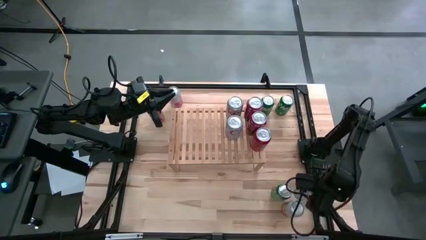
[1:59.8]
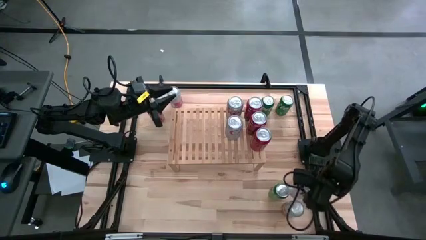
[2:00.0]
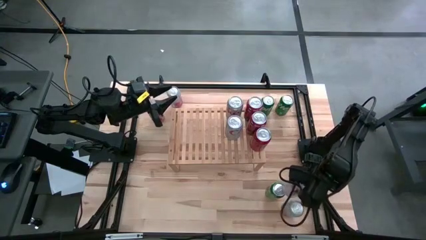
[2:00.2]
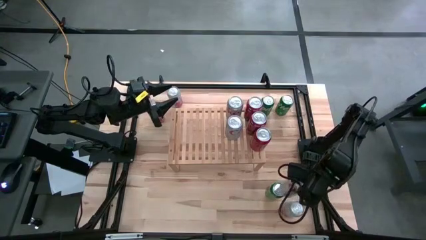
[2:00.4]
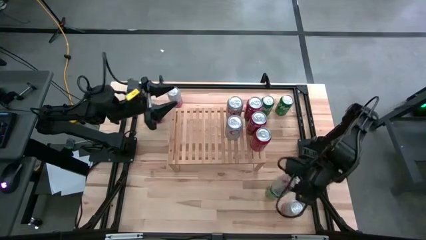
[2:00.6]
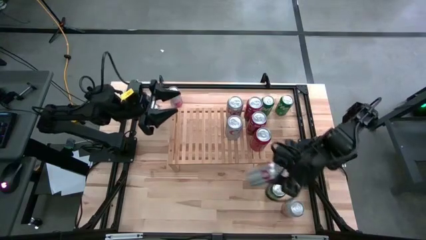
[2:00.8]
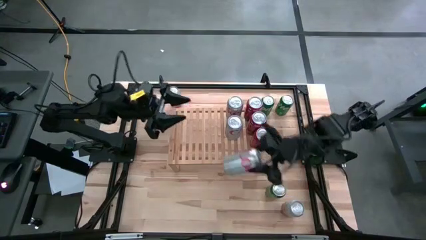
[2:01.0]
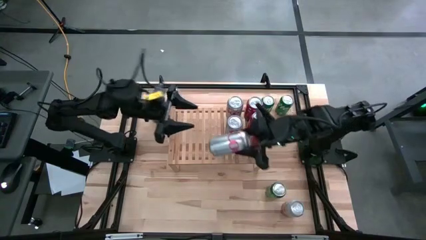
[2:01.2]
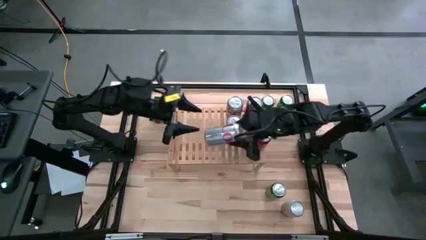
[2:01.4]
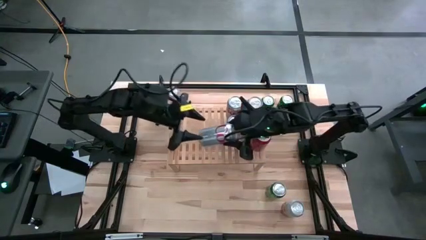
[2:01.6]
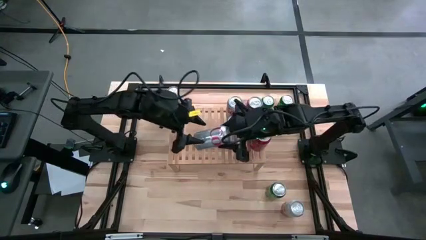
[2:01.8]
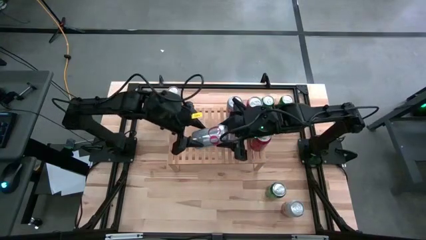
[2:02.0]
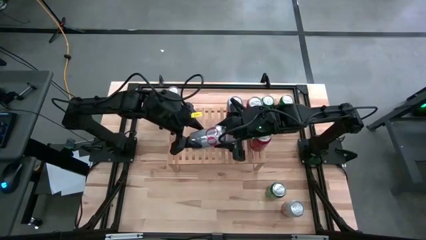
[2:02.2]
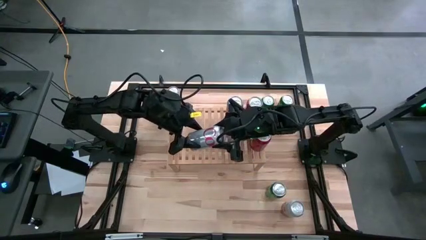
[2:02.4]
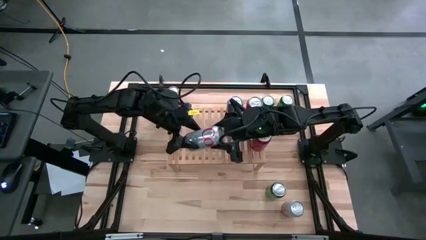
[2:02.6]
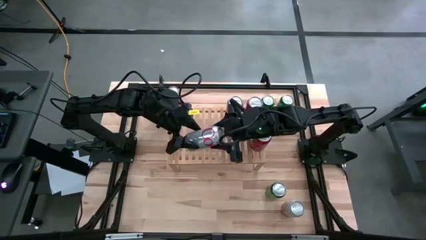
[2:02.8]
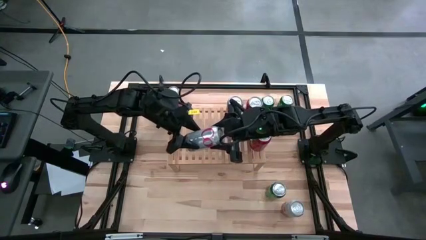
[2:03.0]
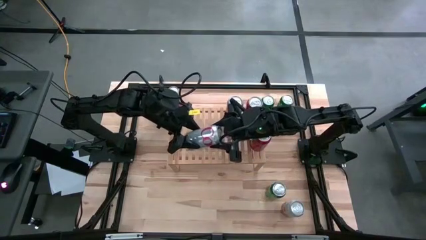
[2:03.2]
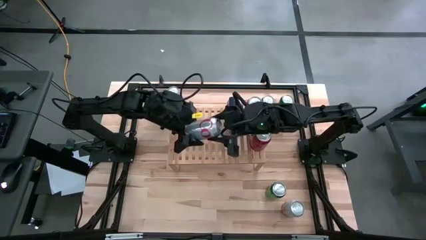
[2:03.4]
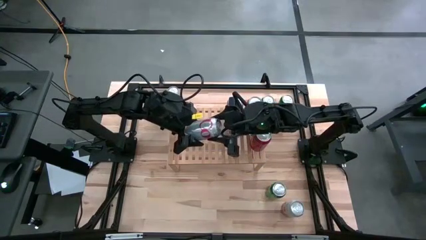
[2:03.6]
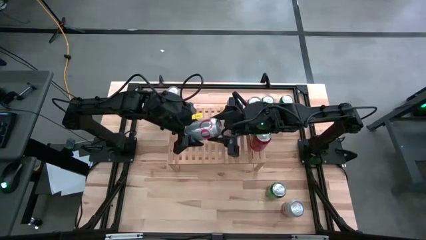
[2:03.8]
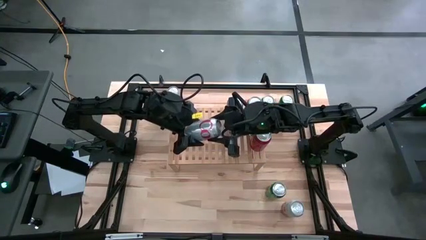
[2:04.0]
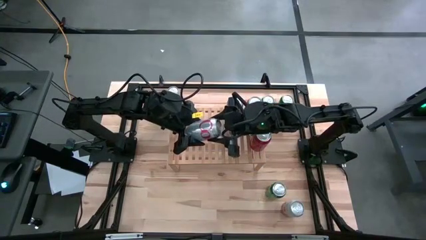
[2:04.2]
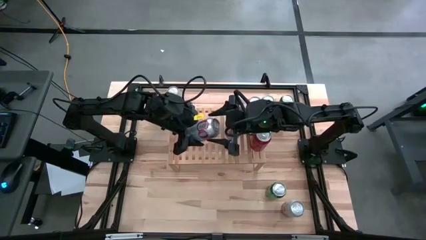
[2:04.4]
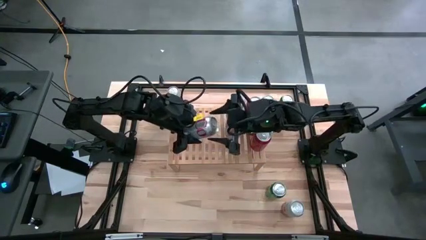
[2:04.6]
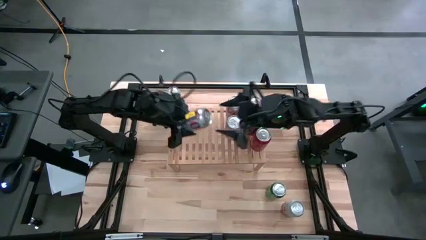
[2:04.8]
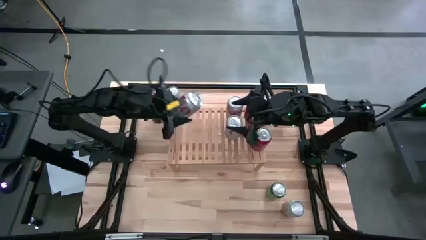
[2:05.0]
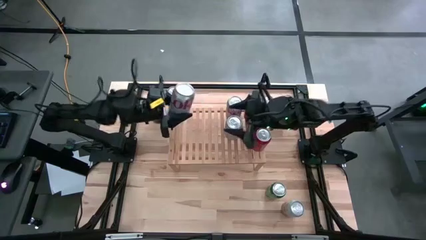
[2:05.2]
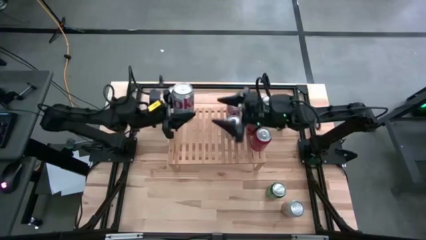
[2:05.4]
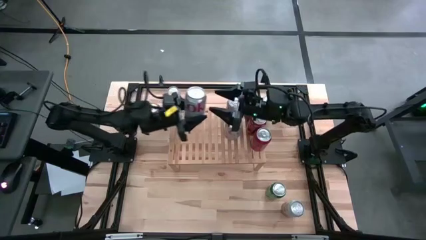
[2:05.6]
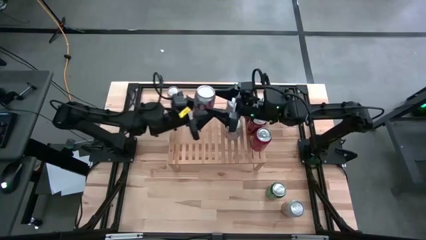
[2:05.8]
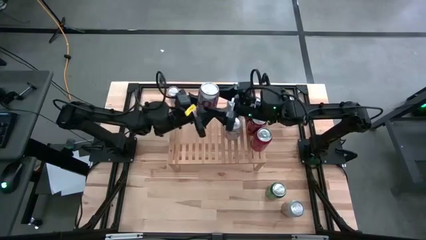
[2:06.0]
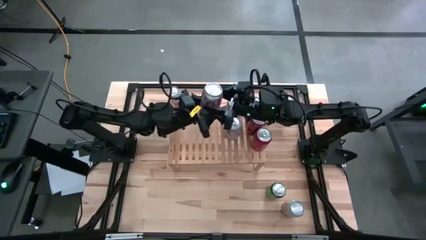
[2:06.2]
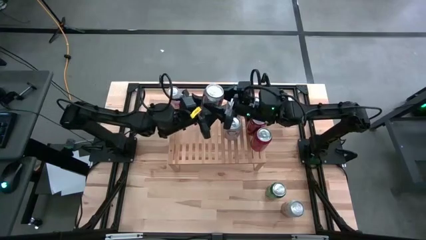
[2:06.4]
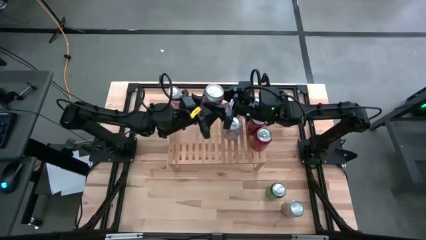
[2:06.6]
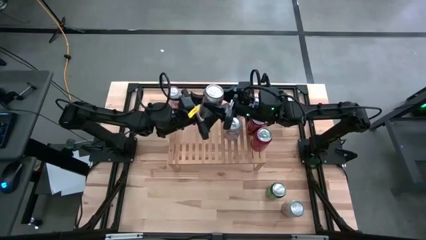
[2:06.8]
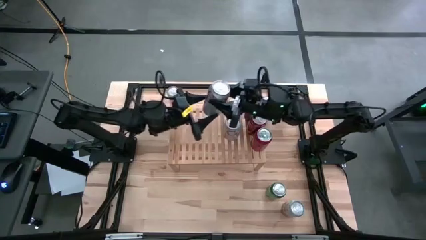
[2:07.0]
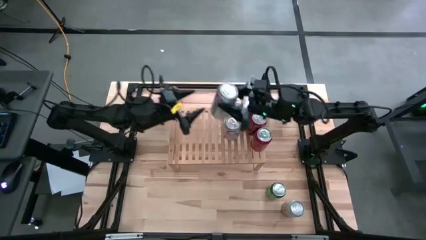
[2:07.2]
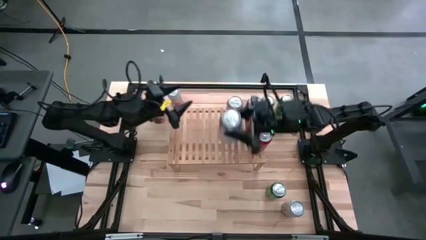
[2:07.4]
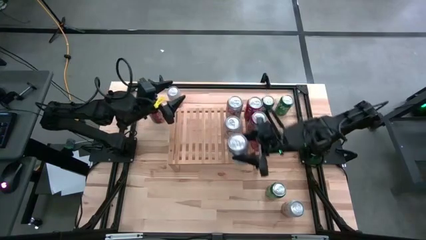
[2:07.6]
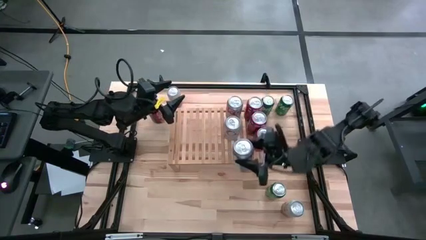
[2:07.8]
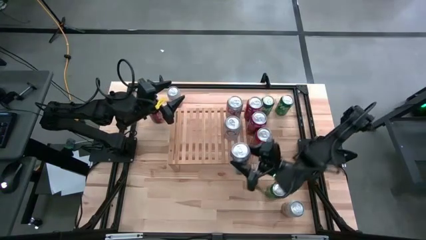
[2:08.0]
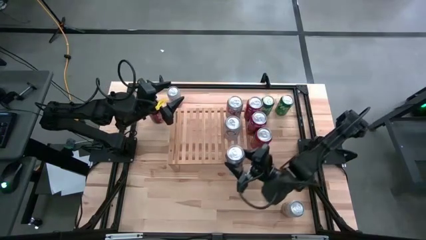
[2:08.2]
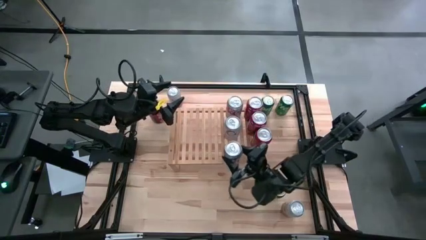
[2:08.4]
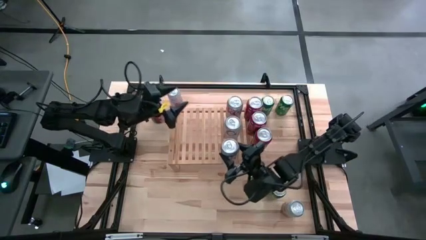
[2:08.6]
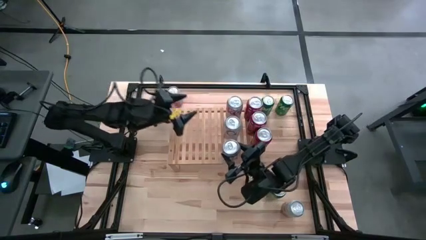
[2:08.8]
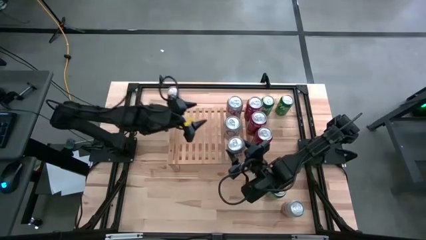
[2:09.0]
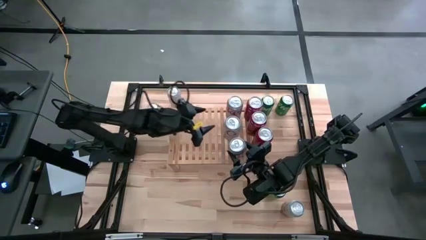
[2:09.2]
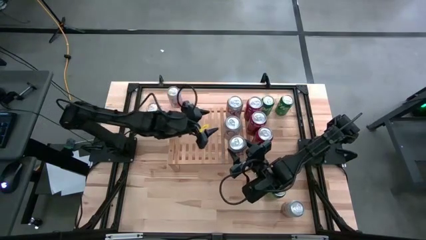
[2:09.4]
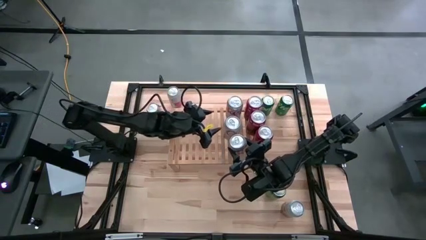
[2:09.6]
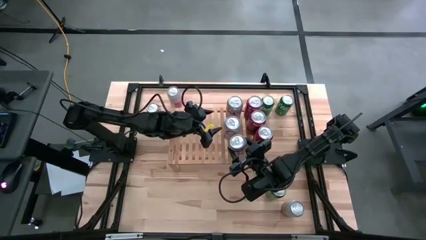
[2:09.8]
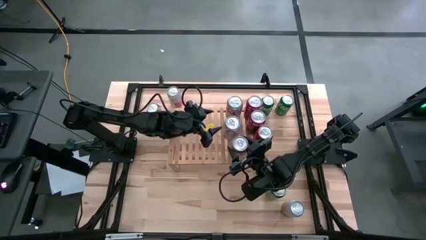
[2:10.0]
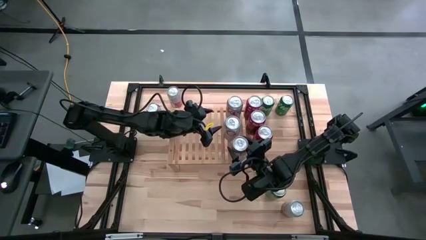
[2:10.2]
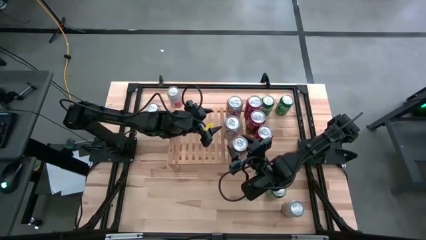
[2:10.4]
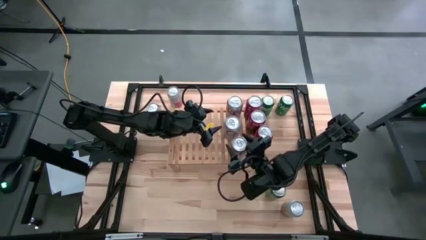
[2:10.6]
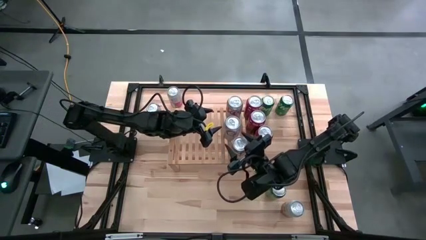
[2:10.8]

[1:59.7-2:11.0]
Task: Place canned beverage on shelf
Put the bottom right silver soda can on the shelf

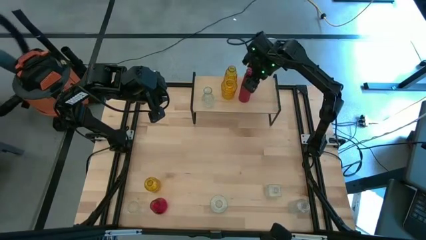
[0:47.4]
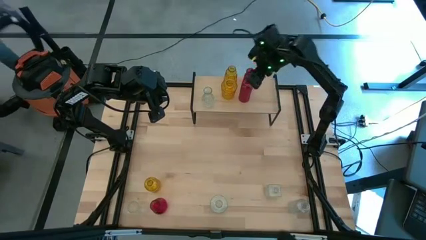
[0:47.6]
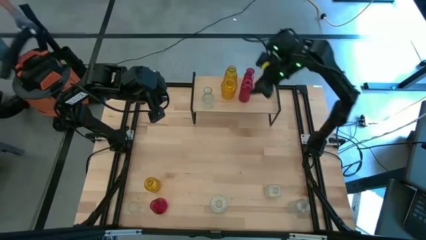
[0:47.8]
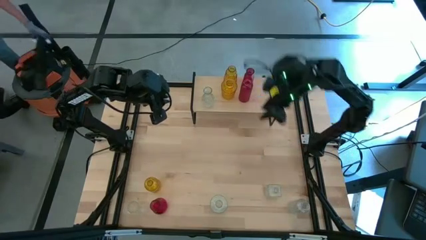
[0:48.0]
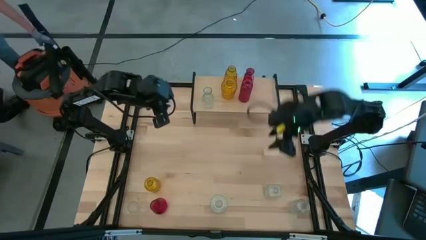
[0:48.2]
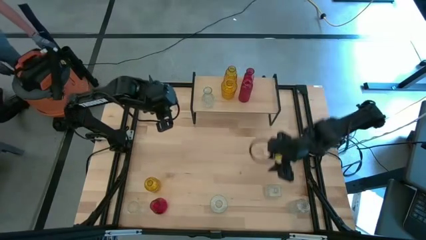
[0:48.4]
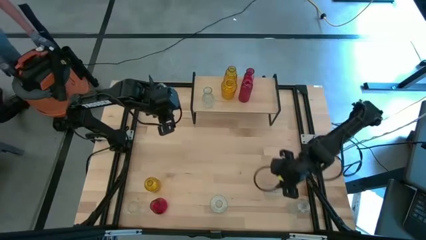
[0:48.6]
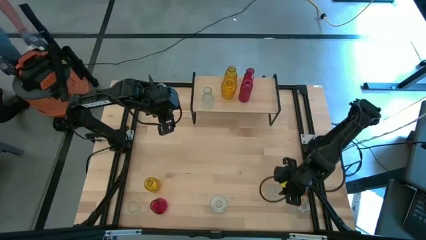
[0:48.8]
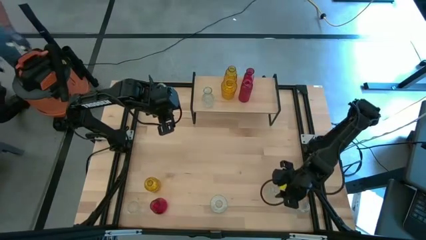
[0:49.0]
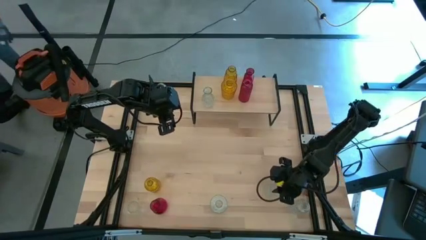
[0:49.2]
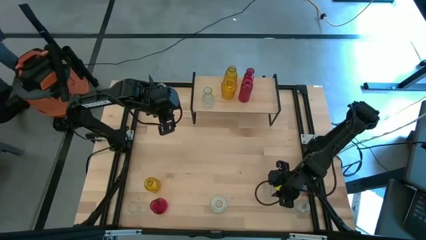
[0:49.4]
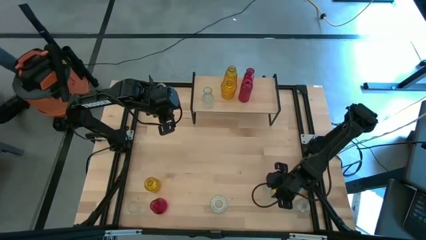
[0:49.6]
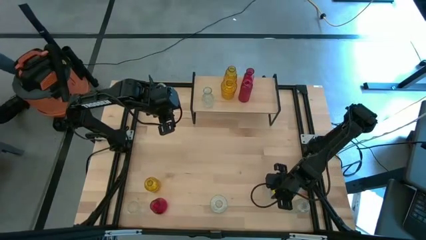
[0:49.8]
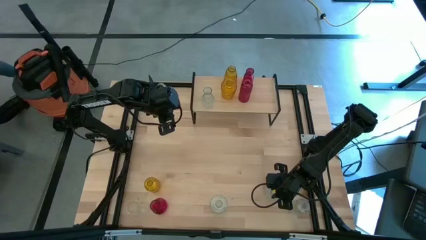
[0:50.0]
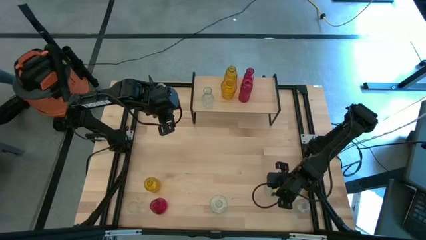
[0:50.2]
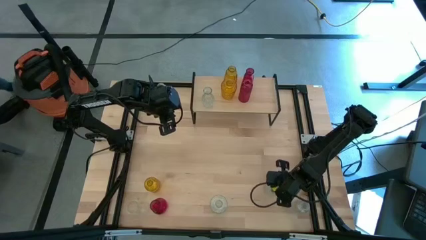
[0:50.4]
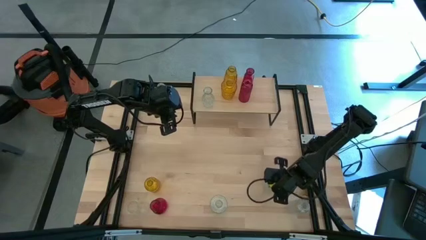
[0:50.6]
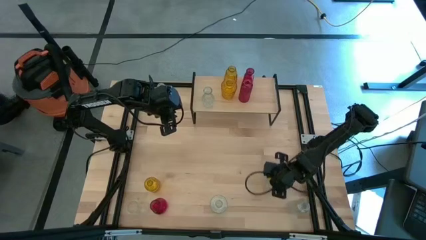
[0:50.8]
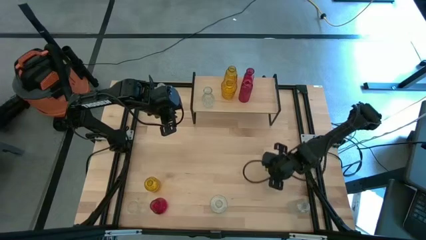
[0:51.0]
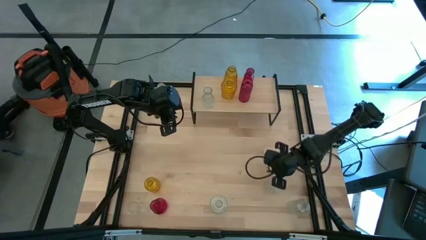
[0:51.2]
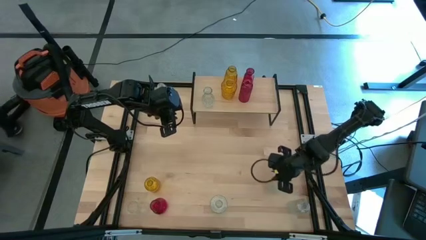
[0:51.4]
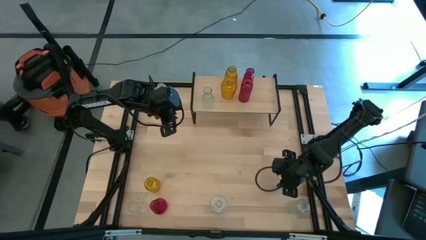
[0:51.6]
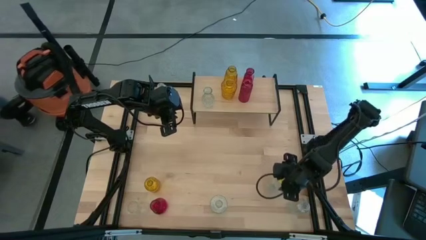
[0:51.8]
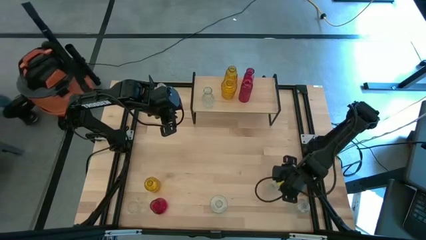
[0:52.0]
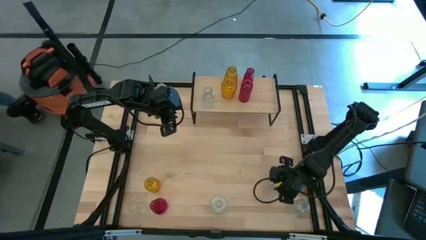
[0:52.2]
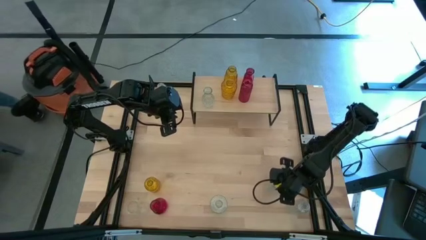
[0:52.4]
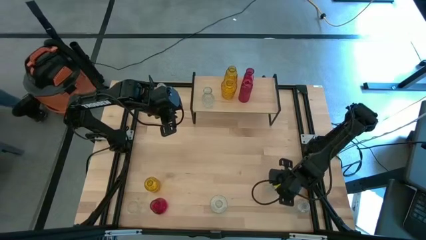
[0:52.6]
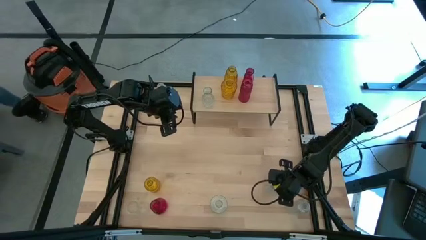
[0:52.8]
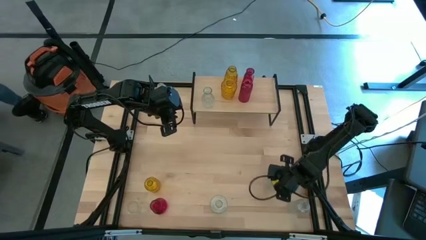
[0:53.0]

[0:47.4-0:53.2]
Task: sort vases onto shelf
Put the transparent vase on the shelf aligned with the other transparent vase
